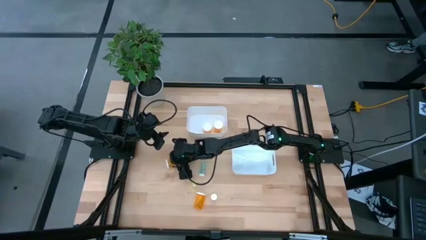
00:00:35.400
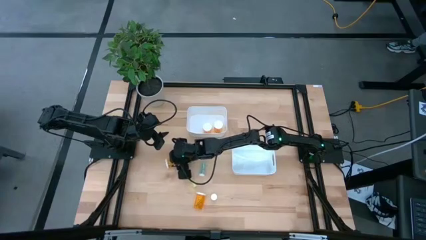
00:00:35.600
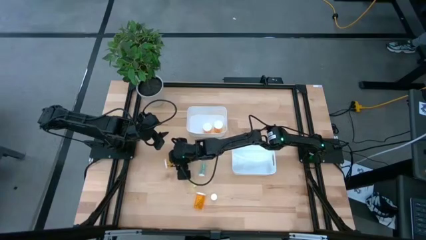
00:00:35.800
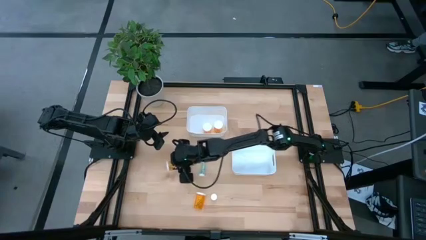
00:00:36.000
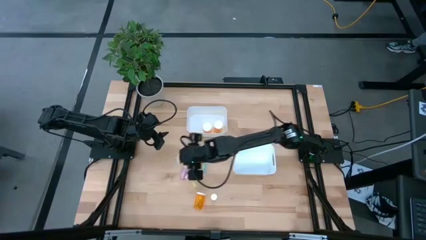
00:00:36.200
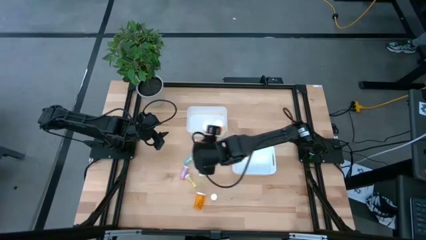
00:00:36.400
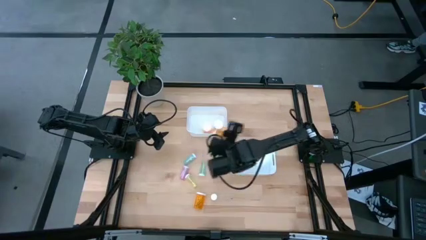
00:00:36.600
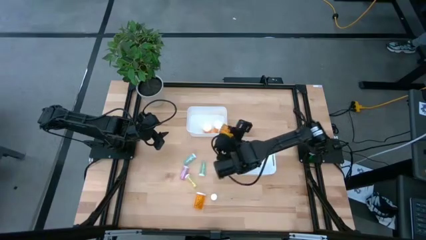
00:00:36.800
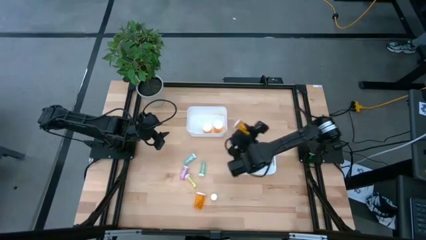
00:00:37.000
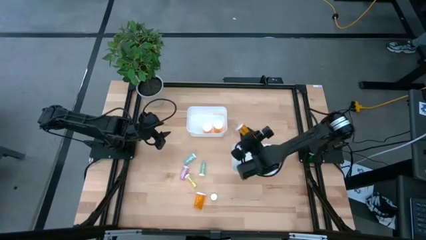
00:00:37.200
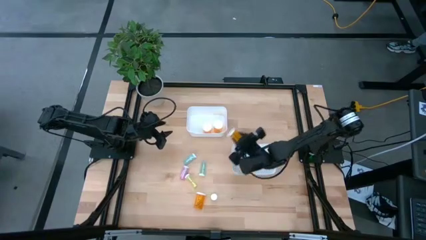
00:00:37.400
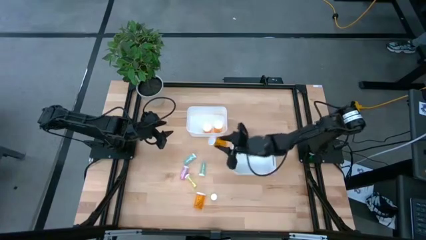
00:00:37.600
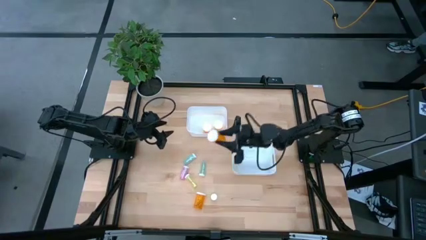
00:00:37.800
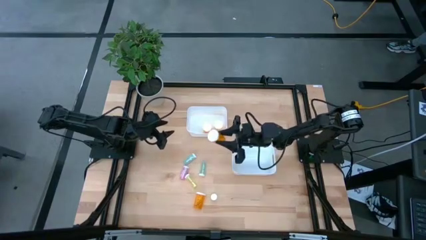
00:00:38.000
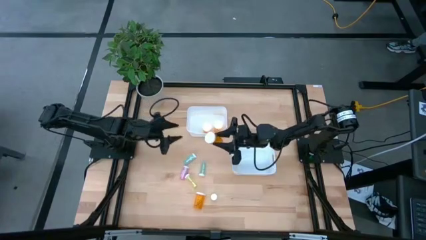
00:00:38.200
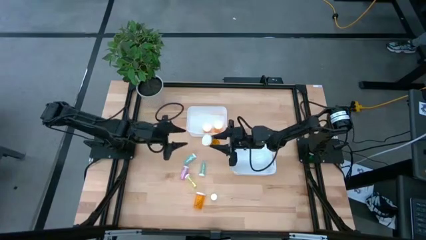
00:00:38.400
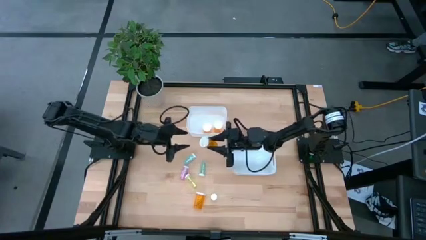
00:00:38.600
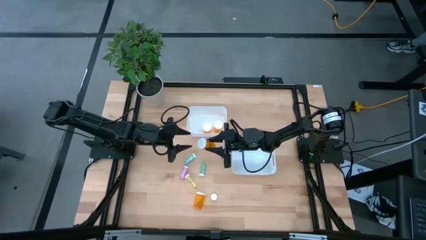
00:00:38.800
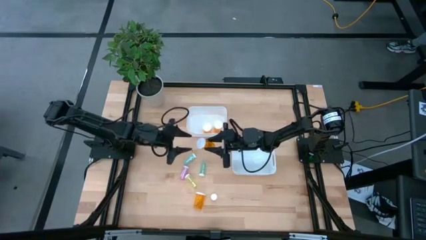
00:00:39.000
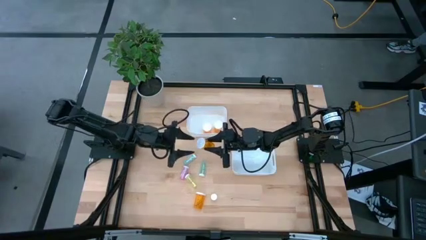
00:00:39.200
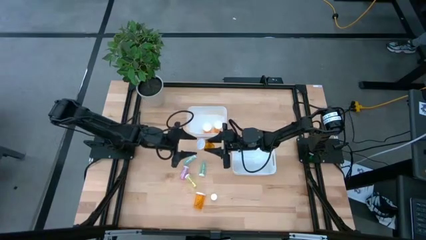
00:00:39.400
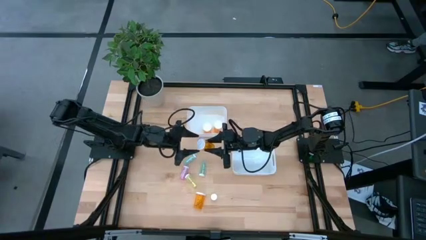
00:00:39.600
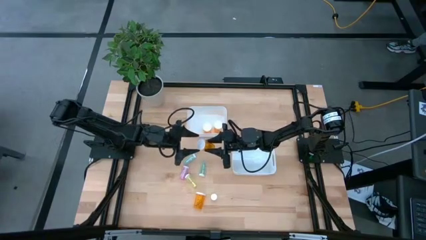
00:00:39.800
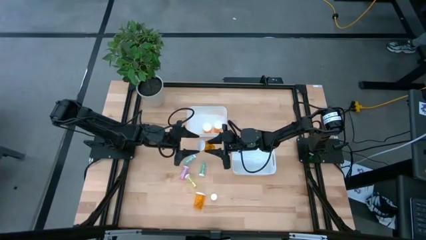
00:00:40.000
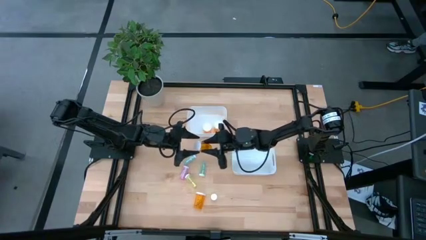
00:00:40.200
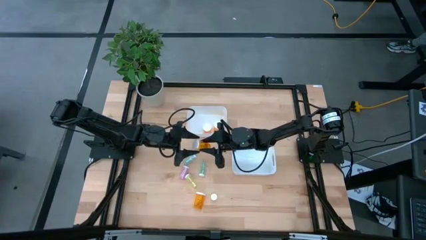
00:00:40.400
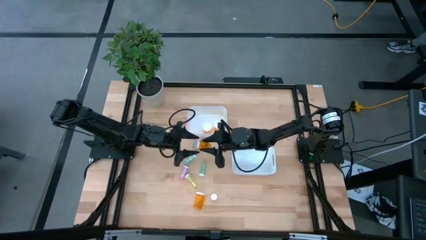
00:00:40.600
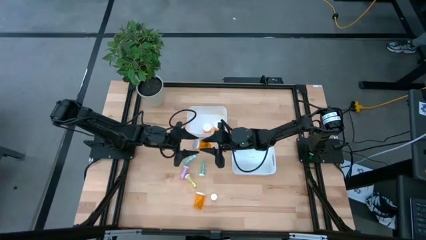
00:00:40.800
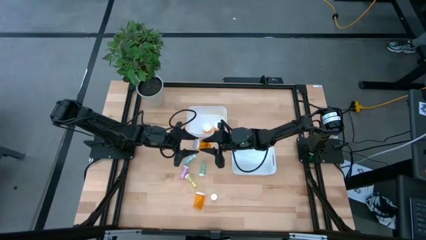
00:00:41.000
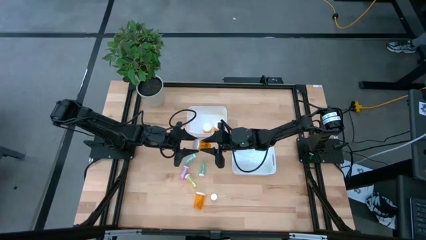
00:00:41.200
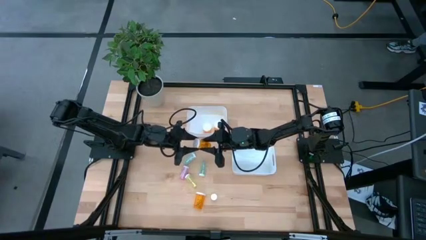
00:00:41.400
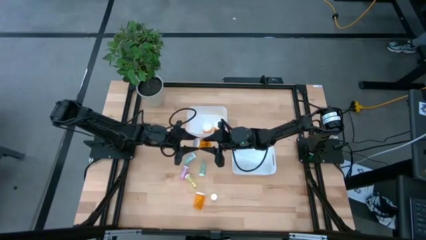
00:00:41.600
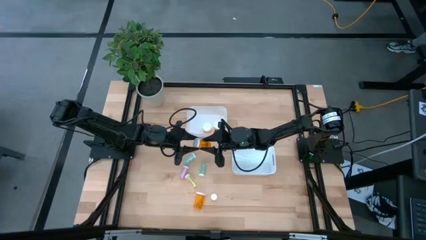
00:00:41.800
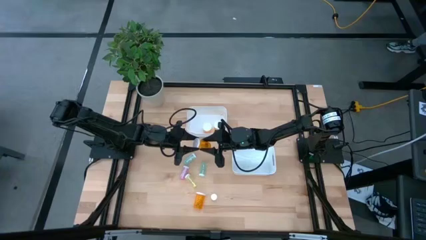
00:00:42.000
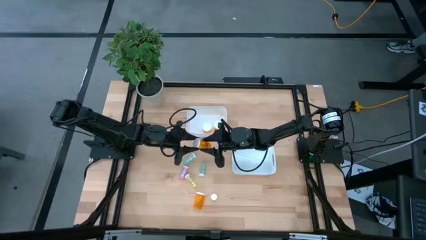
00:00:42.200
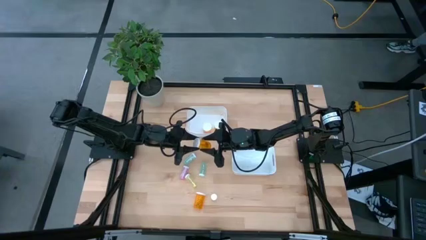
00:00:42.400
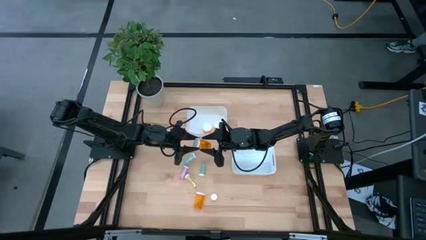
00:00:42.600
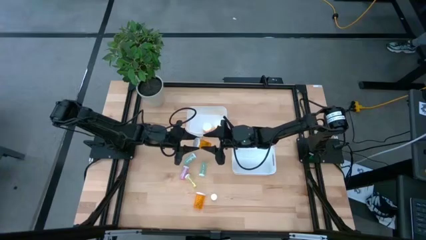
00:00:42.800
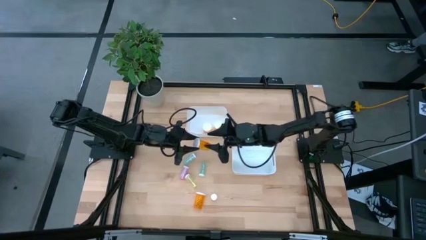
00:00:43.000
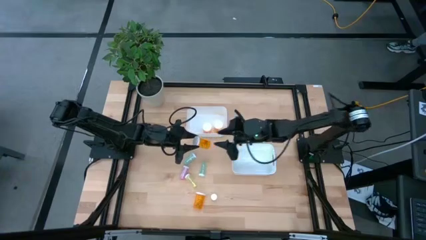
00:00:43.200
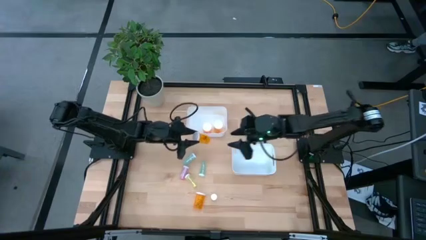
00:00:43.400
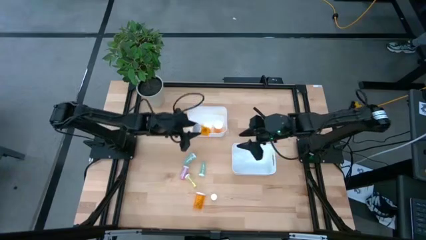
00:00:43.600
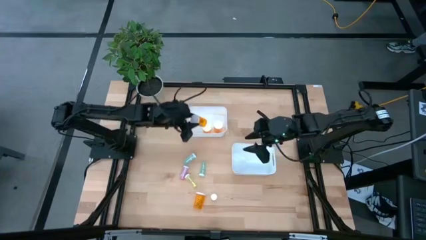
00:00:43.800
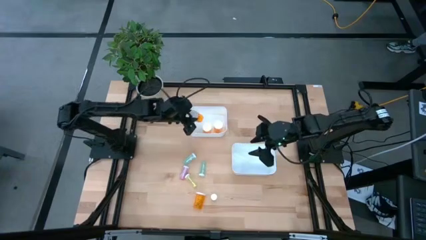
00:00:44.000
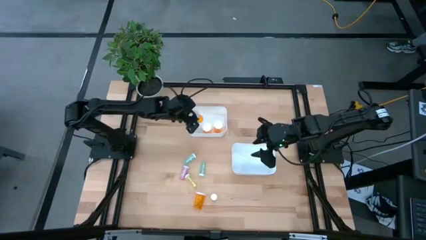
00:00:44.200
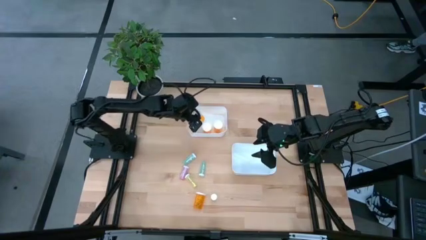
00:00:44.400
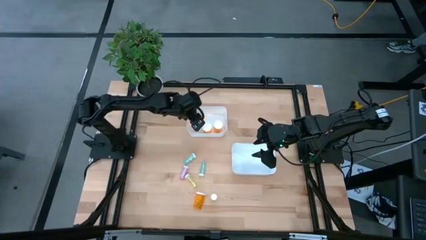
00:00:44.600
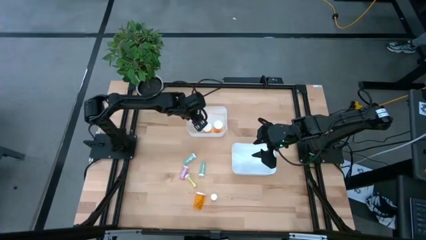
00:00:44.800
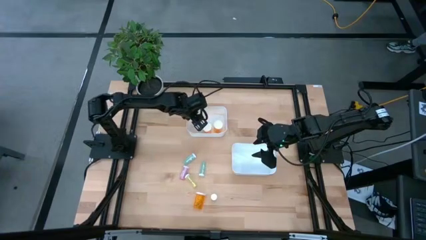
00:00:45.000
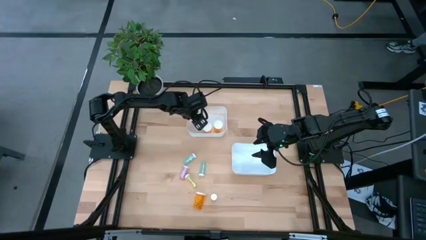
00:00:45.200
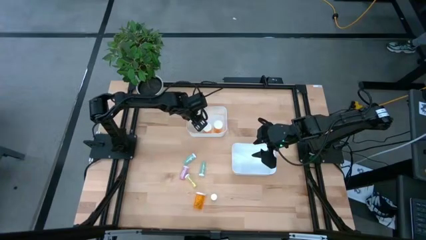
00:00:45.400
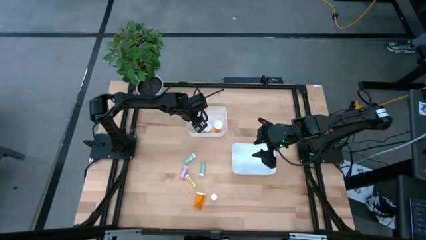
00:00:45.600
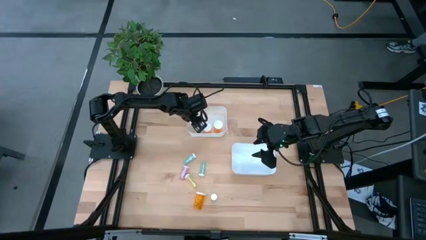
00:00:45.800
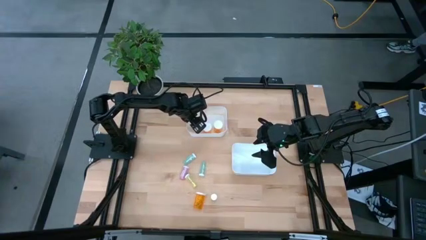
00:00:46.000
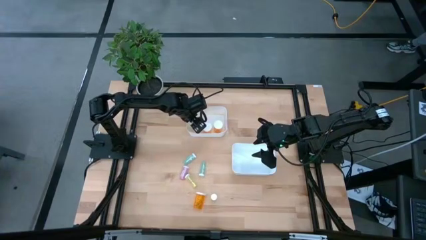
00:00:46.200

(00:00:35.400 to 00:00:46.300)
Task: Pick and place medicine bottles into bin by pill shape (circle, oval)
Put the large orange pill bottle into the top white bin
